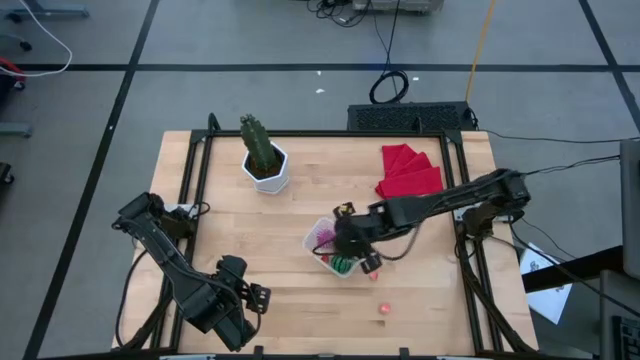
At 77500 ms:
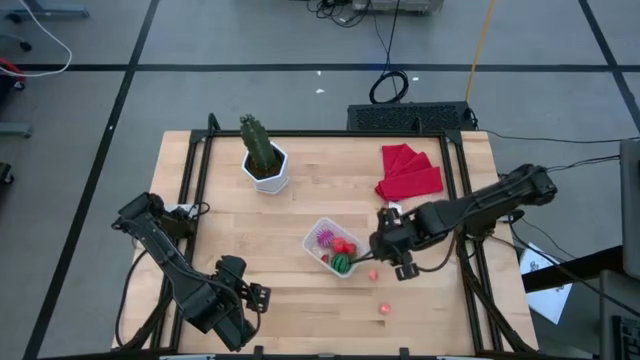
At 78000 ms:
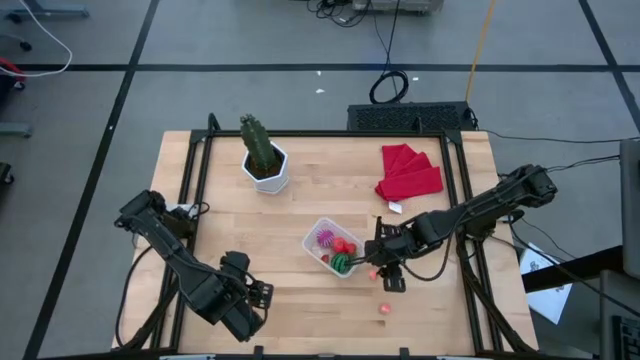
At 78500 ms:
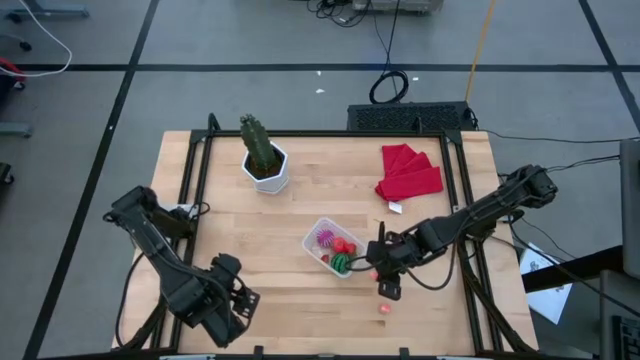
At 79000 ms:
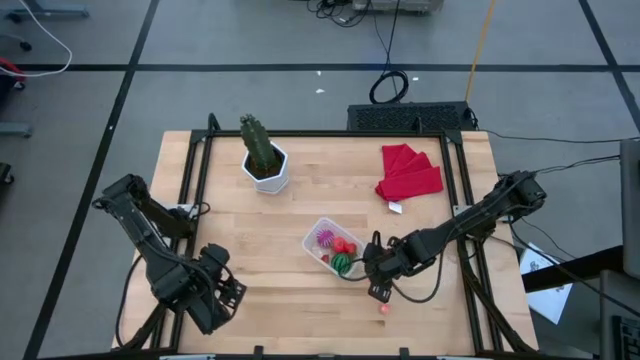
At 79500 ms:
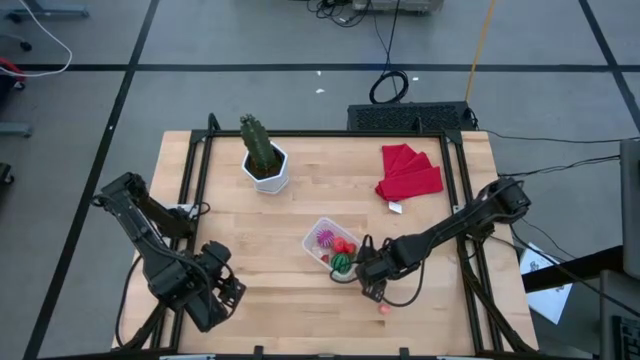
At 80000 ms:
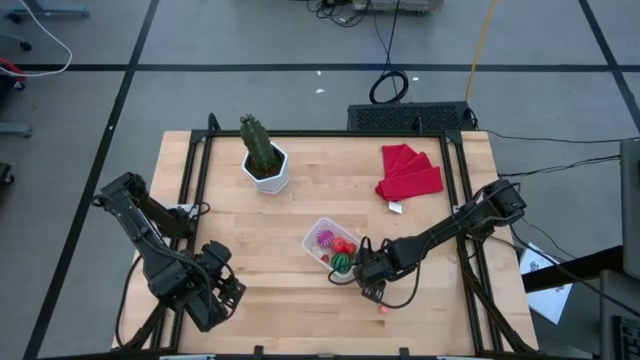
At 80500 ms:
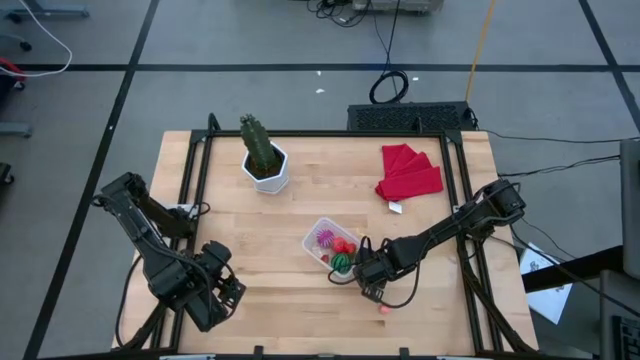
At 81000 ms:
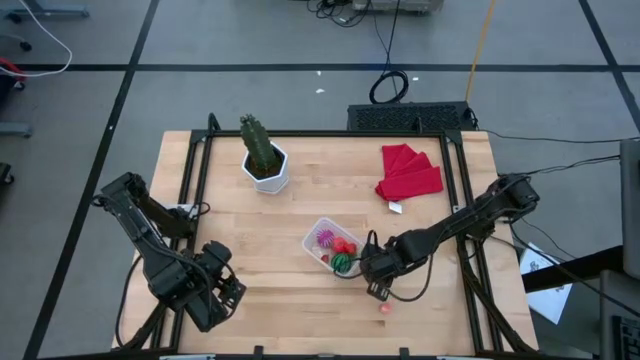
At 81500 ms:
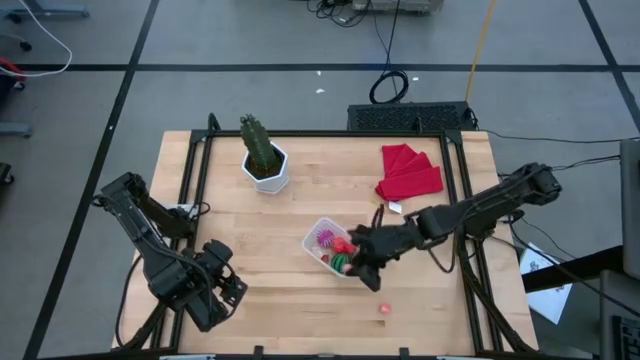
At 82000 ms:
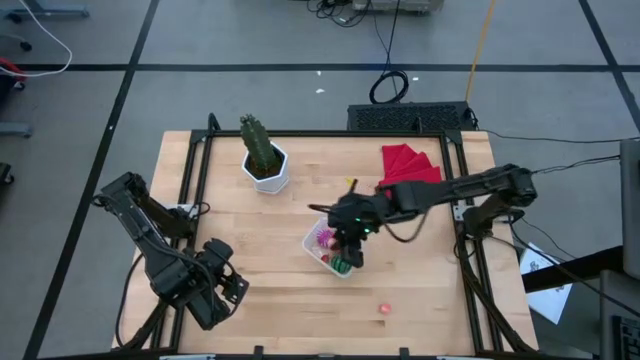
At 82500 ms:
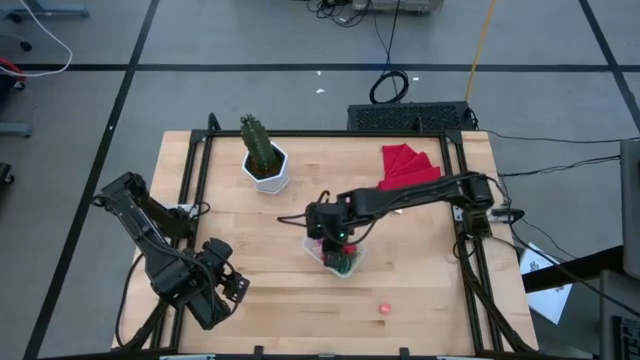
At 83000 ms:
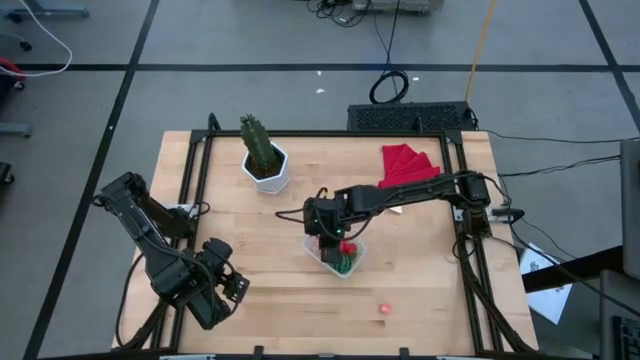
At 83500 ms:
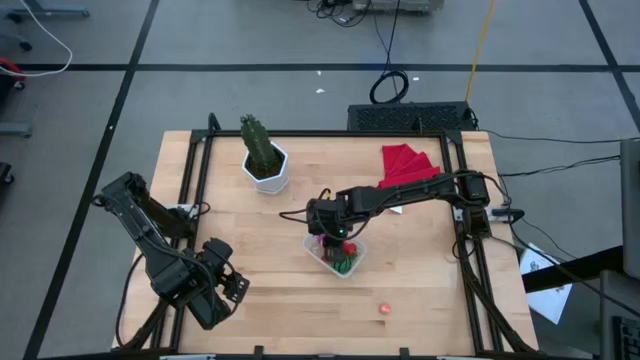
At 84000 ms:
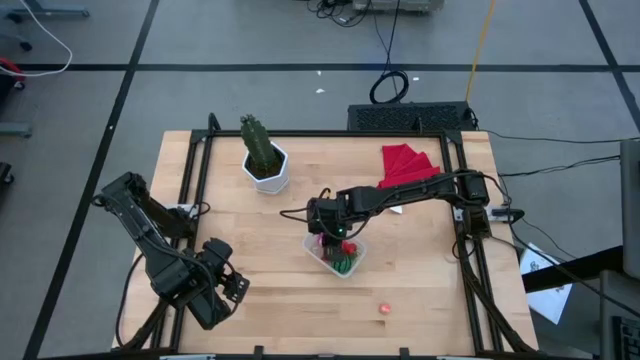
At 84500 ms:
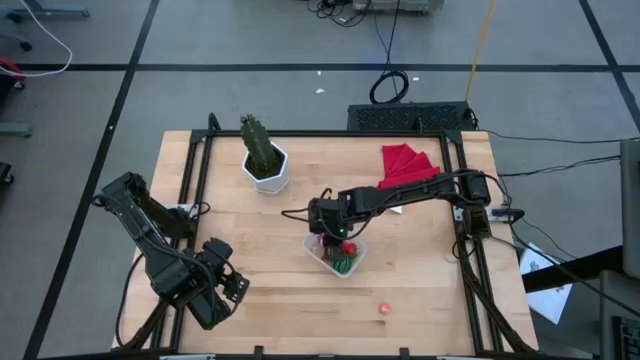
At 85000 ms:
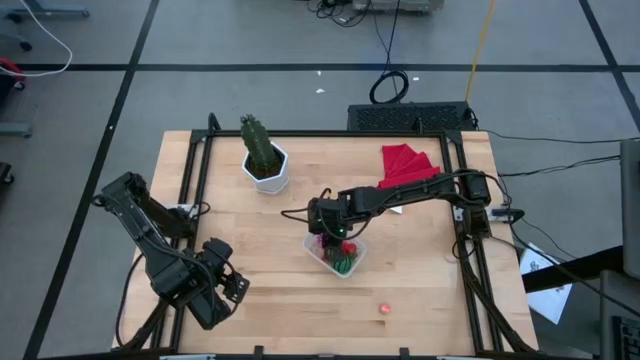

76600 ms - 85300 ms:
Task: Pick and placing Produce into tupperware
Put the top peach into the transparent bin

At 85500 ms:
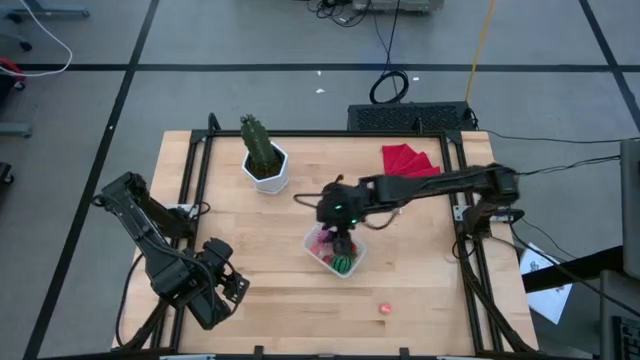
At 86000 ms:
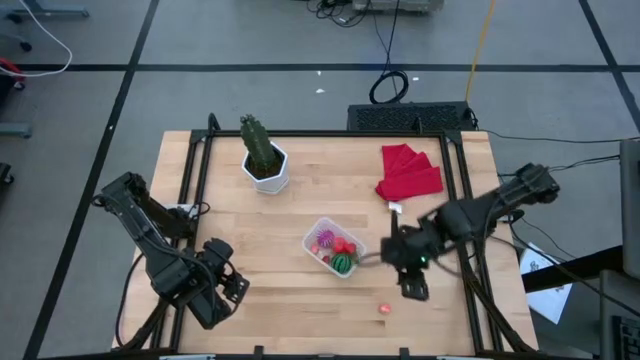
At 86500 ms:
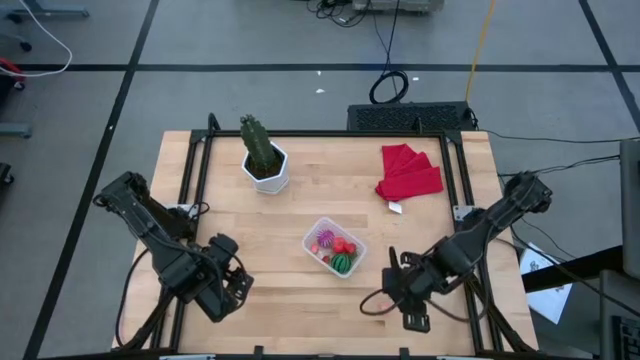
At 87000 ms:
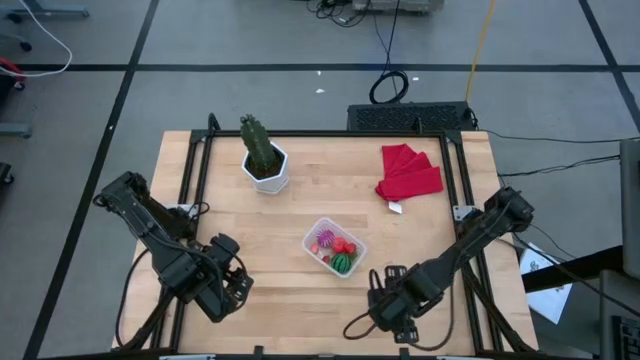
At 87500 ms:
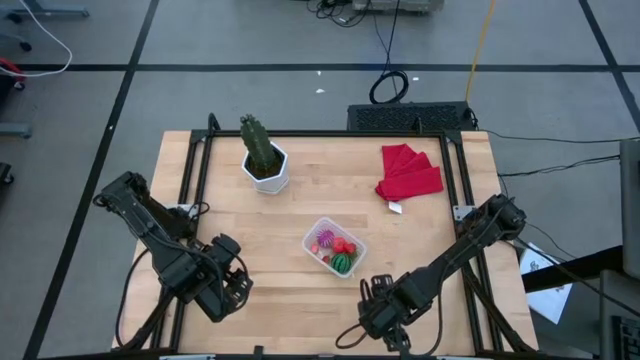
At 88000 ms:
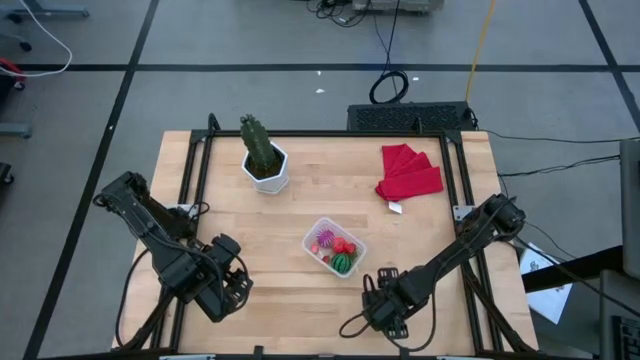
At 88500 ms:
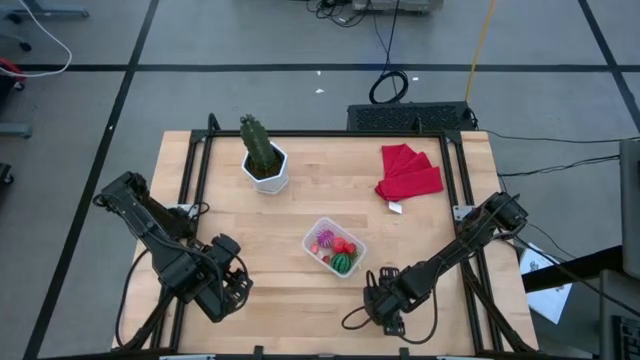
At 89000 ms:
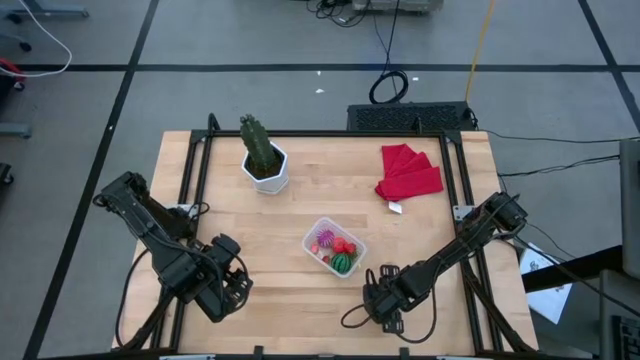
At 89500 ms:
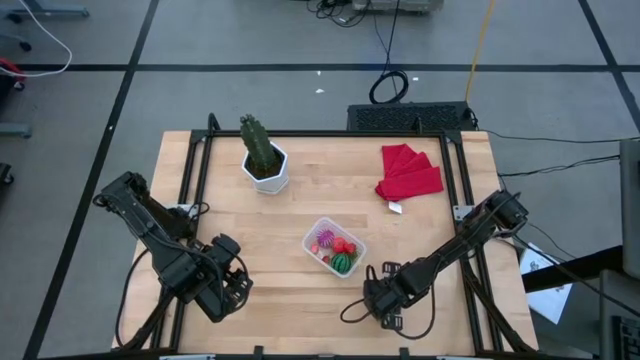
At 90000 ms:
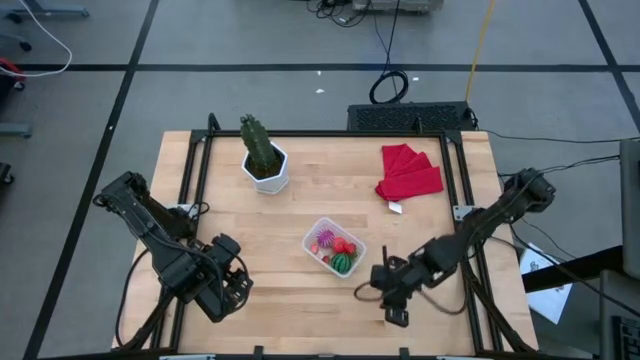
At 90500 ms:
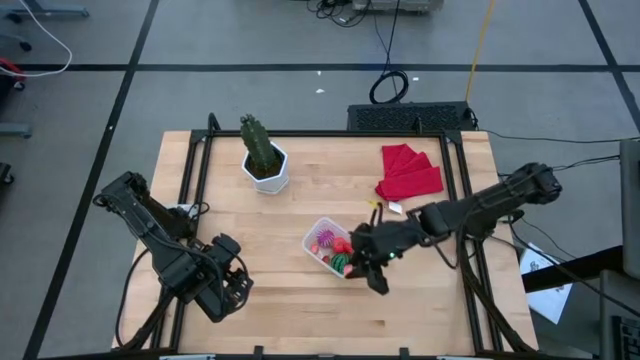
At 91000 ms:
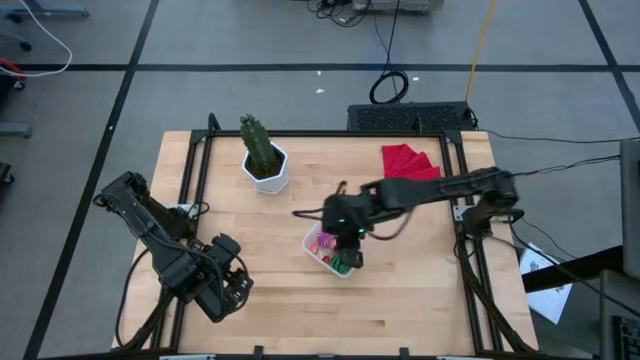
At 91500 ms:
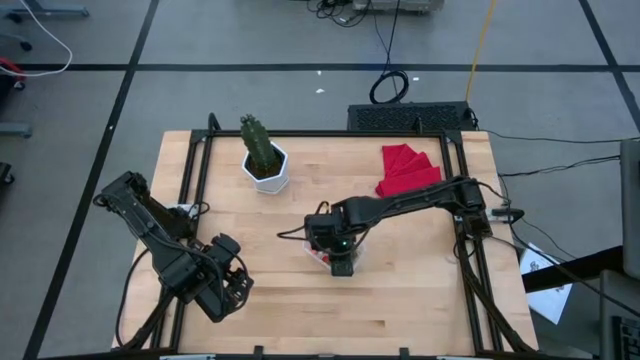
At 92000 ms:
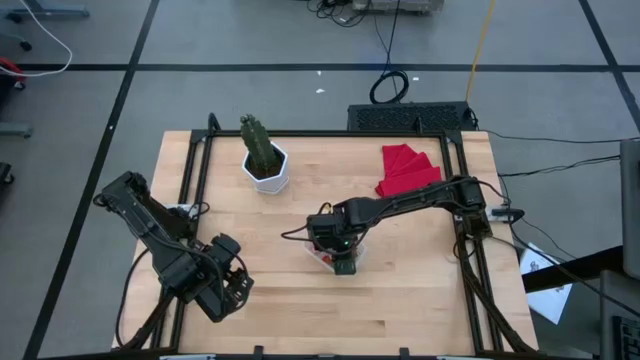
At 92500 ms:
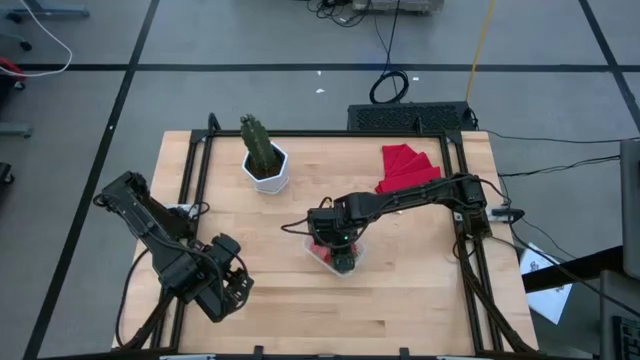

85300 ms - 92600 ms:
Put the peach into the transparent bin

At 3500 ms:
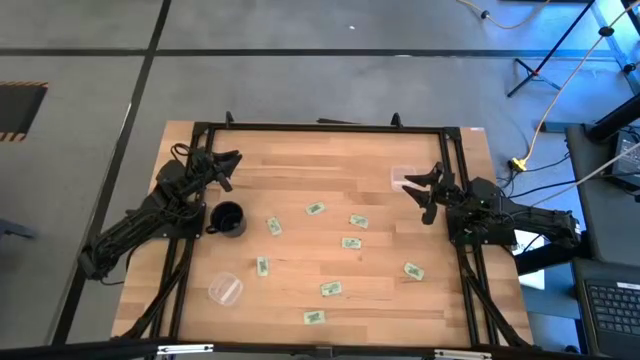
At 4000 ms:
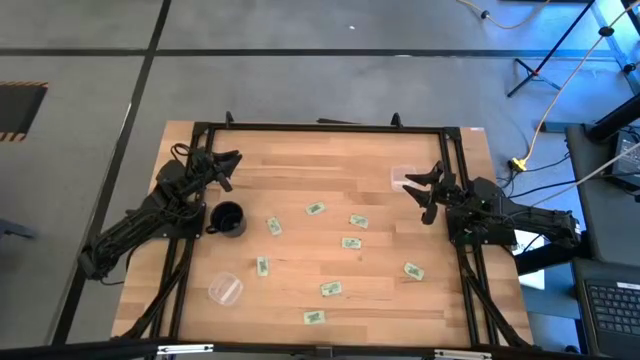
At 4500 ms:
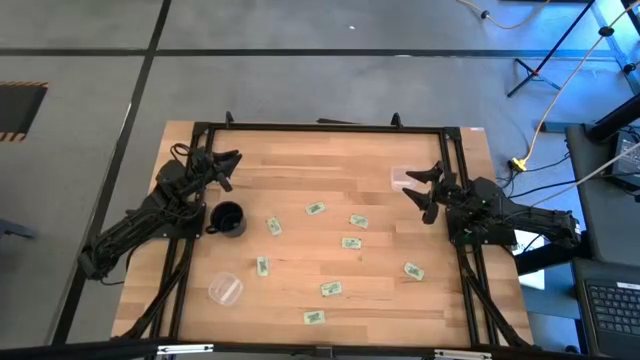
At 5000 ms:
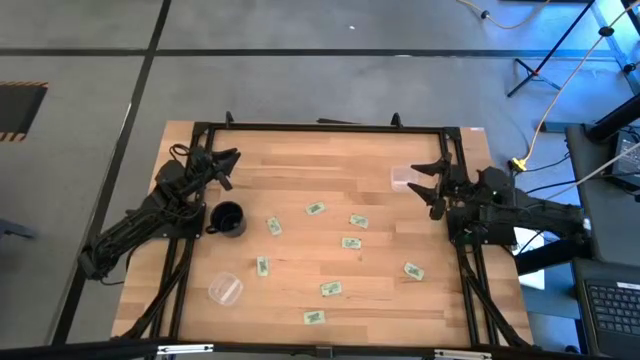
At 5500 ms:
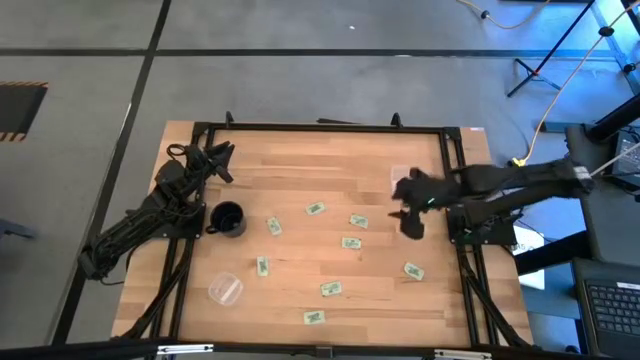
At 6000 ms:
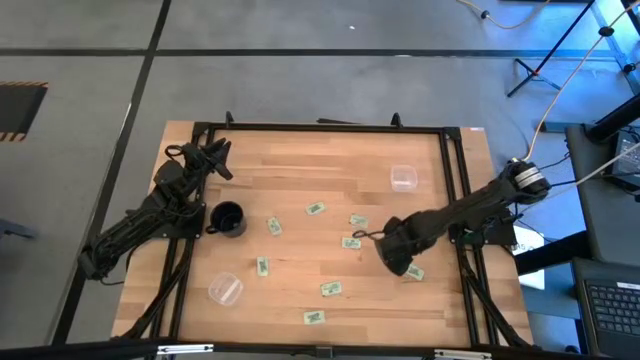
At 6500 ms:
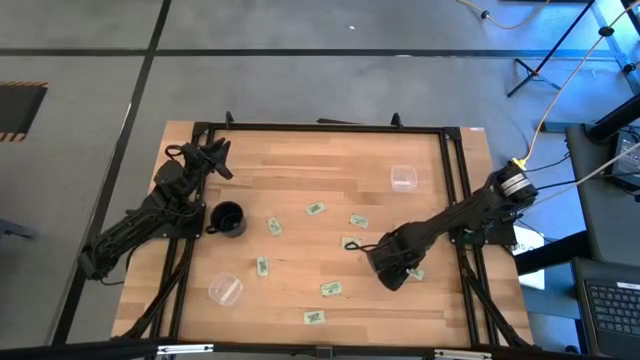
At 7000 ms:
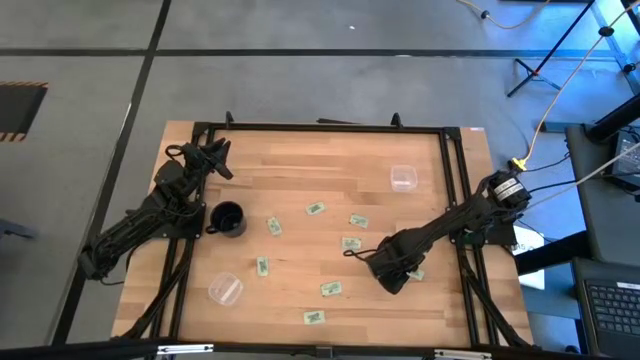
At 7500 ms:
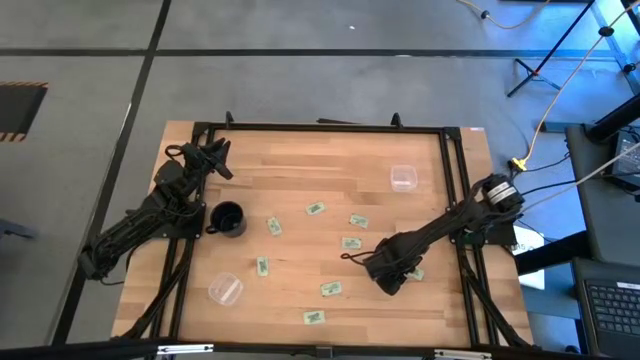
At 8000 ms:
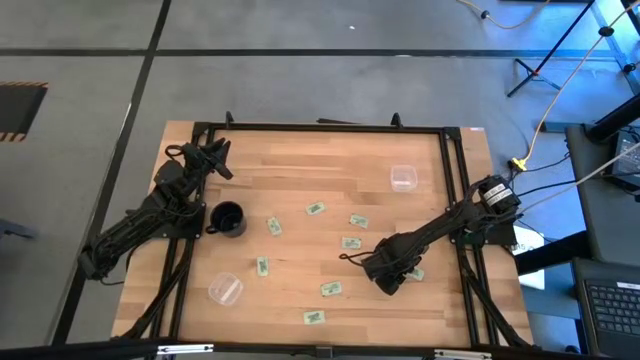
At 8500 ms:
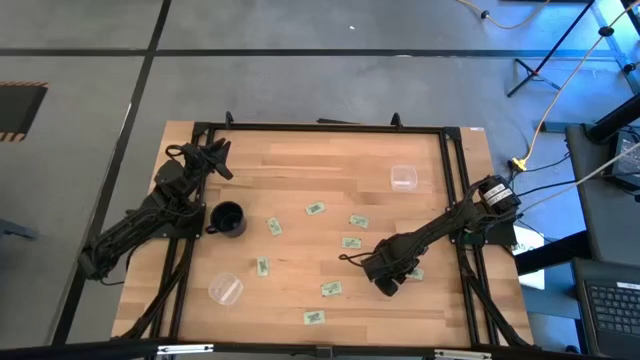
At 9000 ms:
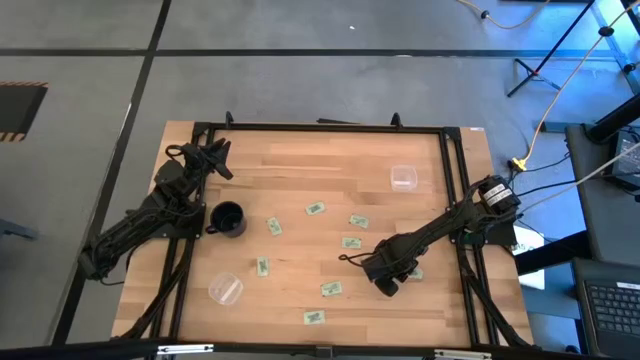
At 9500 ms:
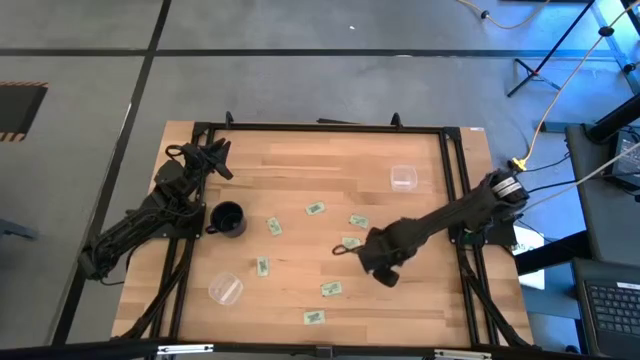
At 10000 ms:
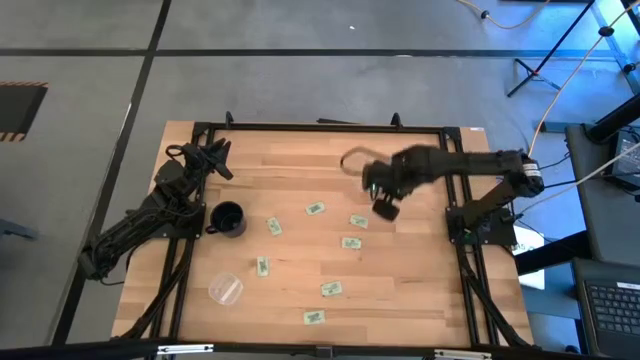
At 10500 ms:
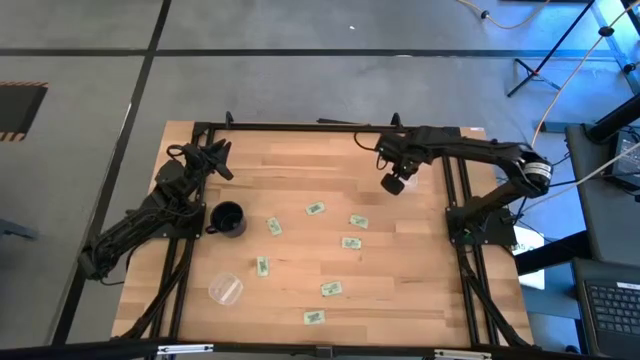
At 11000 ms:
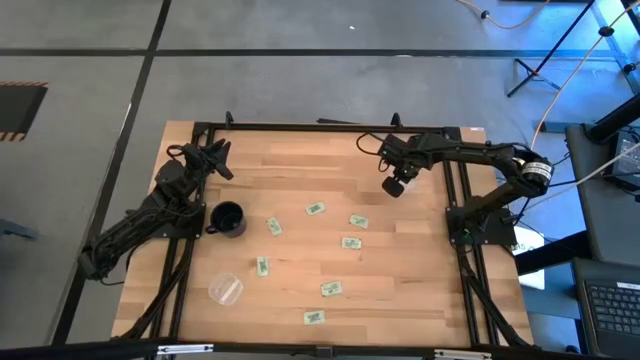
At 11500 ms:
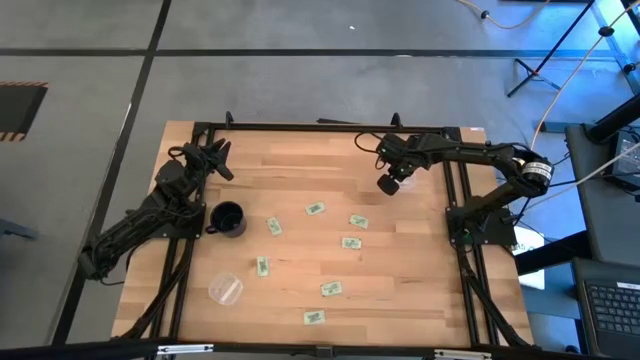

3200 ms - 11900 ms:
Task: Pick and place items into bin
Put the light green stevia packet into the top transparent bin
